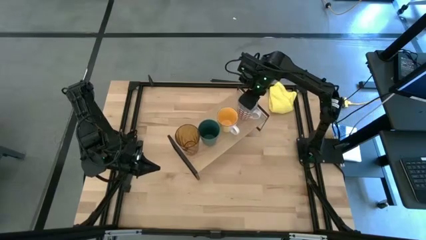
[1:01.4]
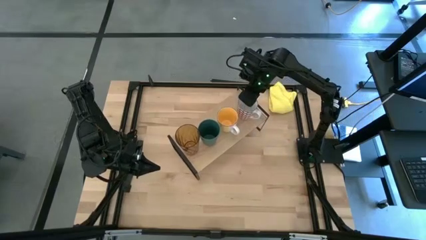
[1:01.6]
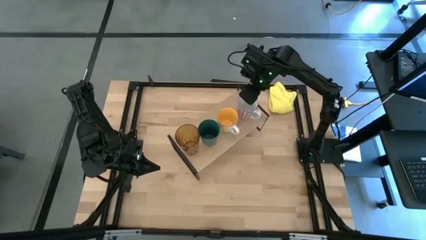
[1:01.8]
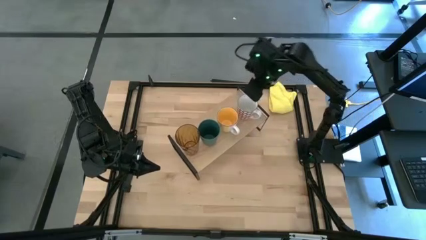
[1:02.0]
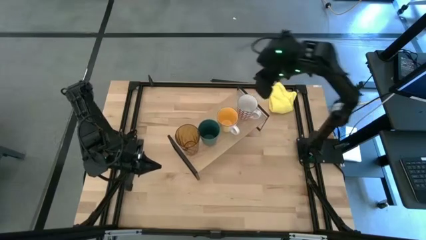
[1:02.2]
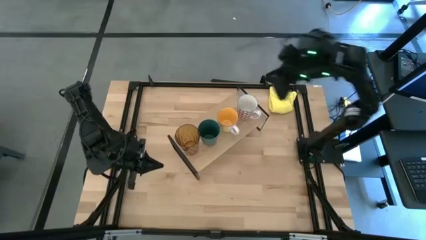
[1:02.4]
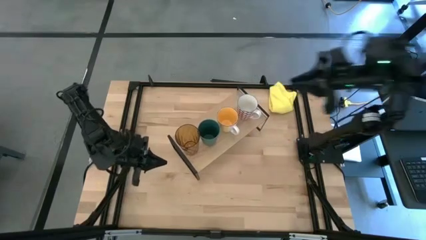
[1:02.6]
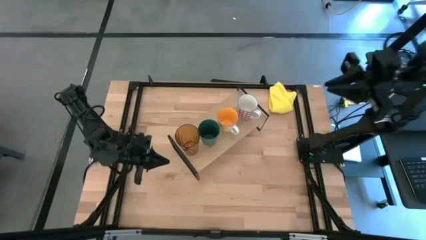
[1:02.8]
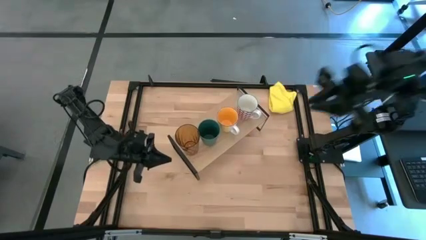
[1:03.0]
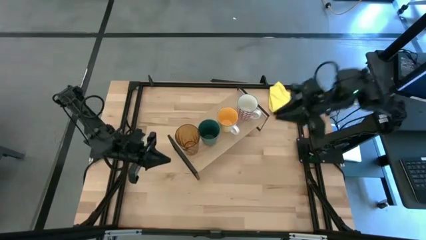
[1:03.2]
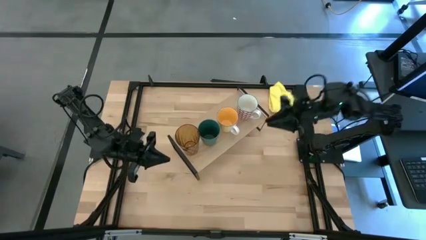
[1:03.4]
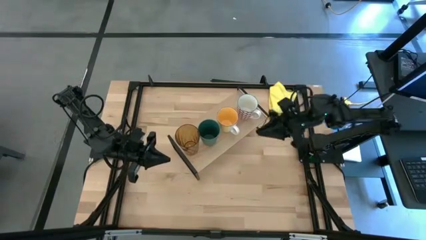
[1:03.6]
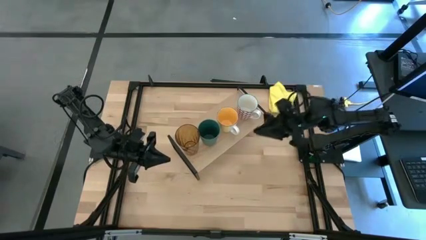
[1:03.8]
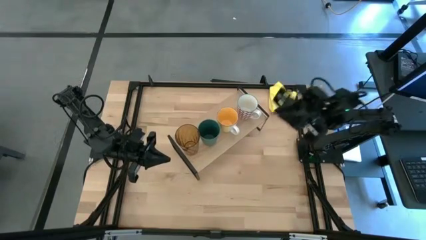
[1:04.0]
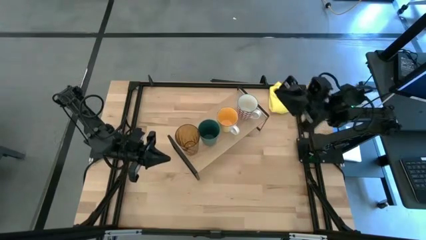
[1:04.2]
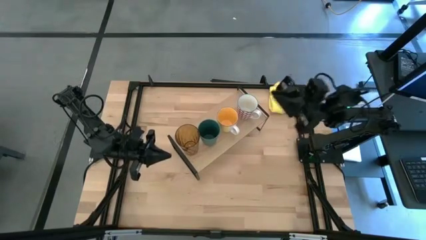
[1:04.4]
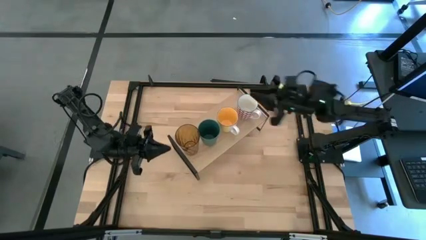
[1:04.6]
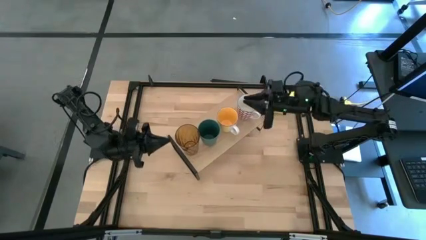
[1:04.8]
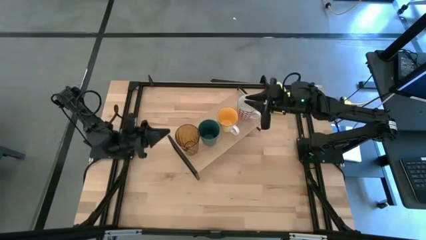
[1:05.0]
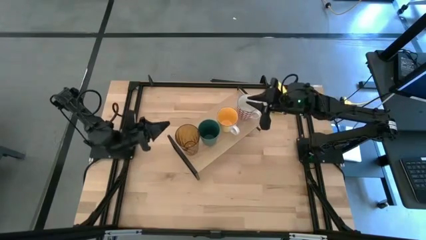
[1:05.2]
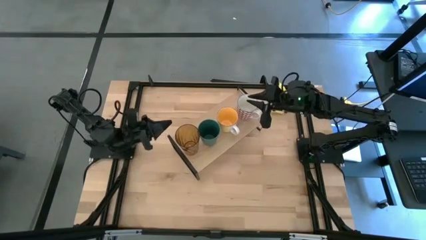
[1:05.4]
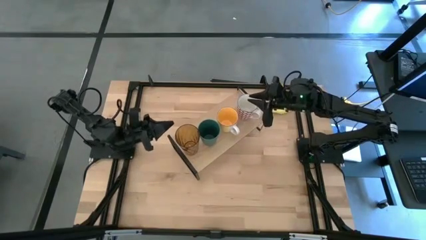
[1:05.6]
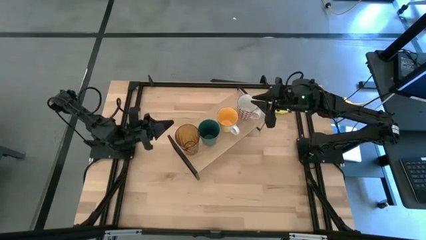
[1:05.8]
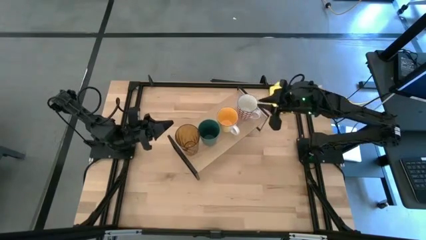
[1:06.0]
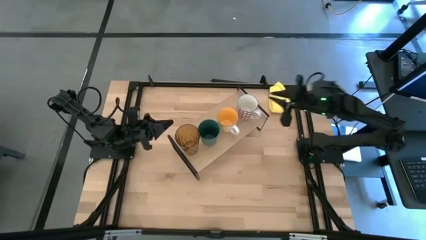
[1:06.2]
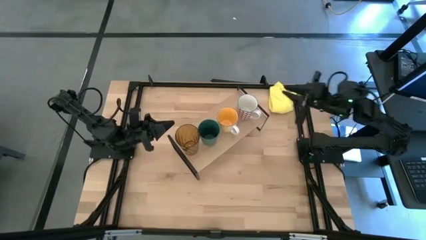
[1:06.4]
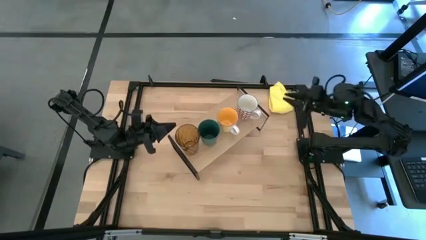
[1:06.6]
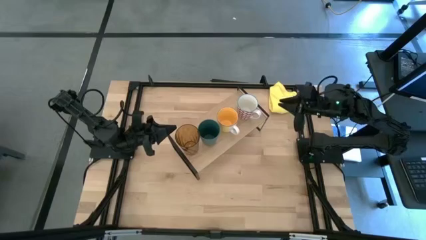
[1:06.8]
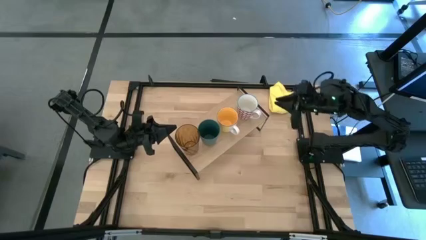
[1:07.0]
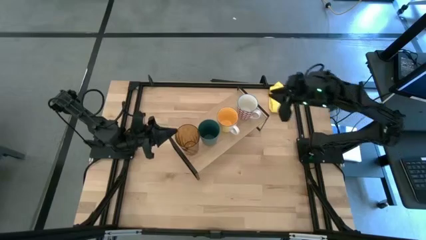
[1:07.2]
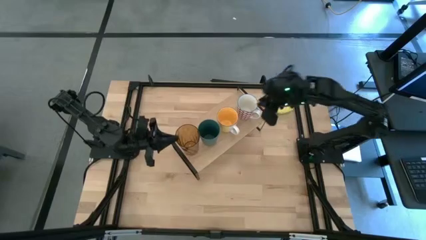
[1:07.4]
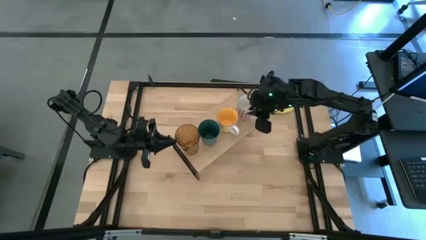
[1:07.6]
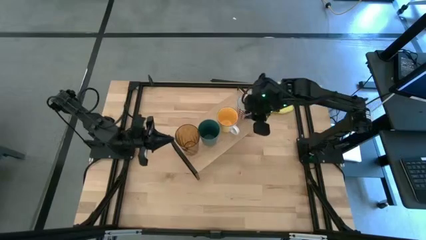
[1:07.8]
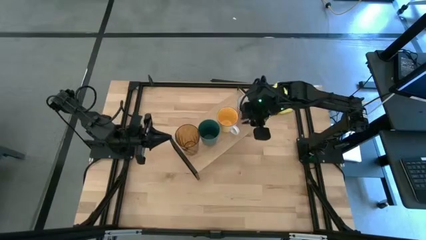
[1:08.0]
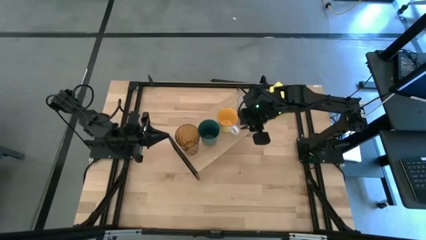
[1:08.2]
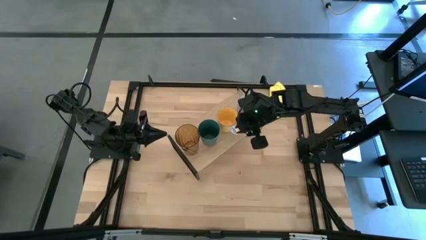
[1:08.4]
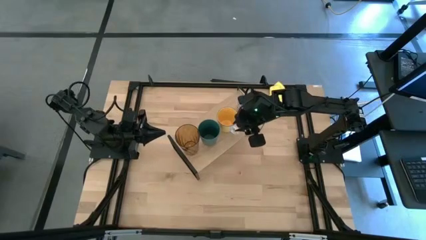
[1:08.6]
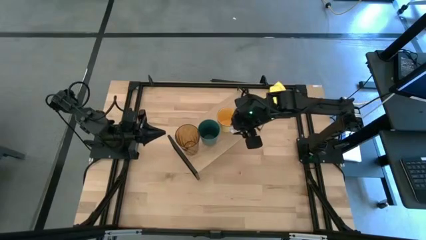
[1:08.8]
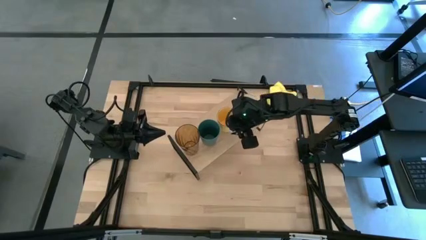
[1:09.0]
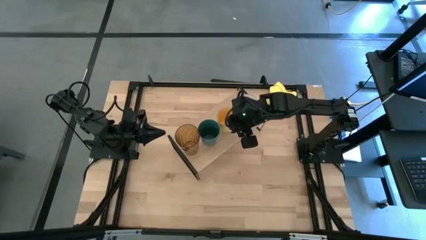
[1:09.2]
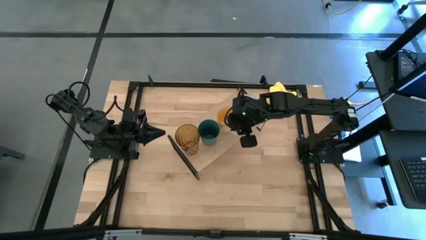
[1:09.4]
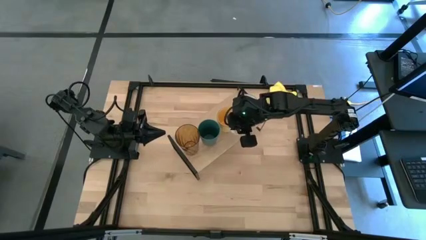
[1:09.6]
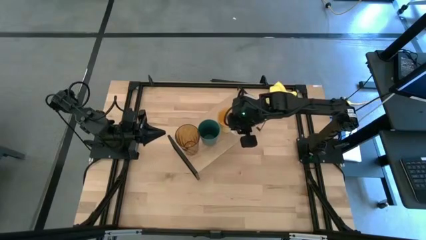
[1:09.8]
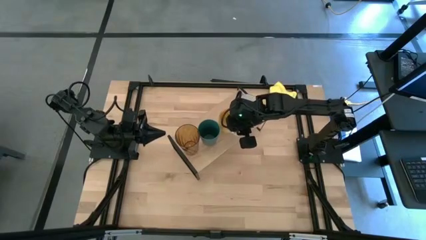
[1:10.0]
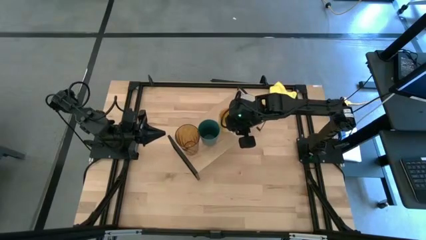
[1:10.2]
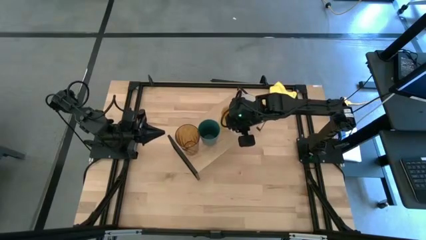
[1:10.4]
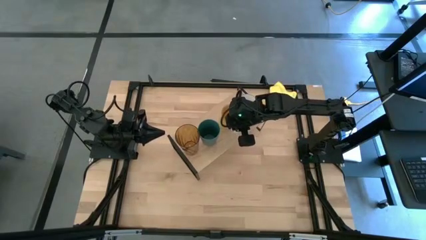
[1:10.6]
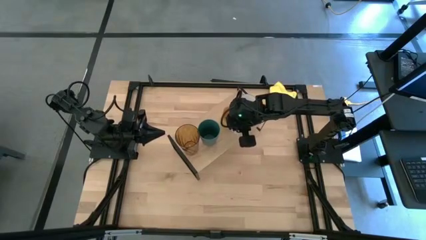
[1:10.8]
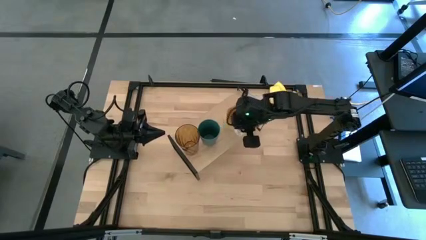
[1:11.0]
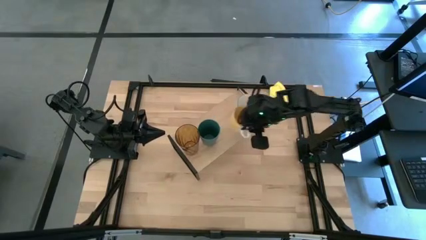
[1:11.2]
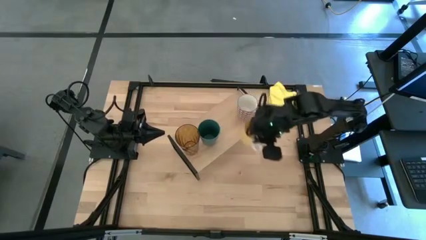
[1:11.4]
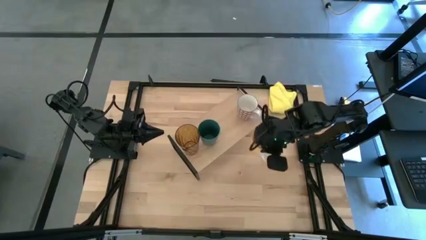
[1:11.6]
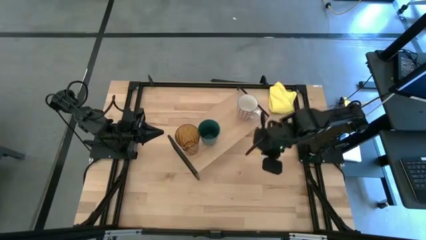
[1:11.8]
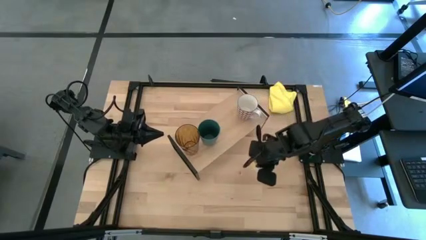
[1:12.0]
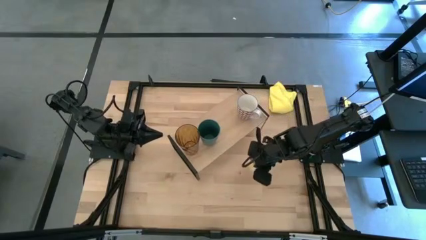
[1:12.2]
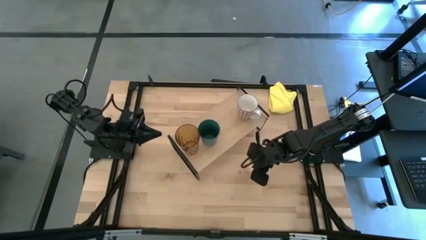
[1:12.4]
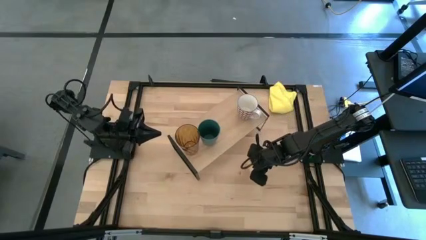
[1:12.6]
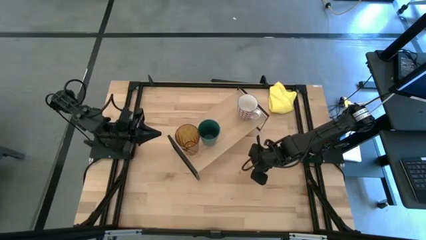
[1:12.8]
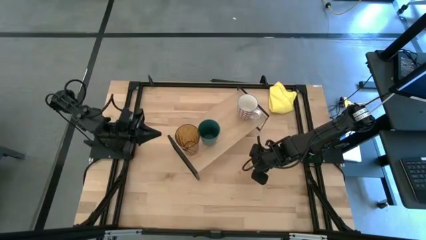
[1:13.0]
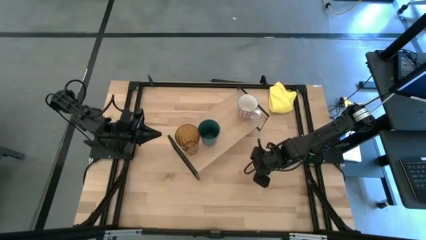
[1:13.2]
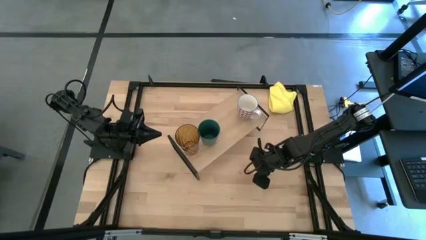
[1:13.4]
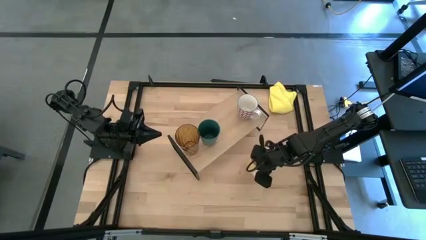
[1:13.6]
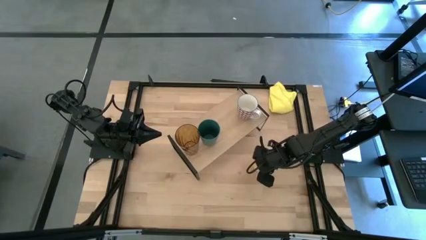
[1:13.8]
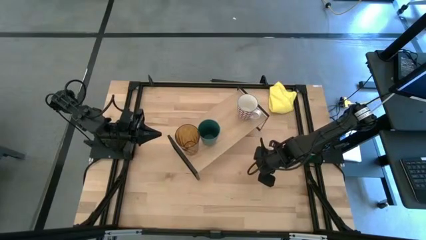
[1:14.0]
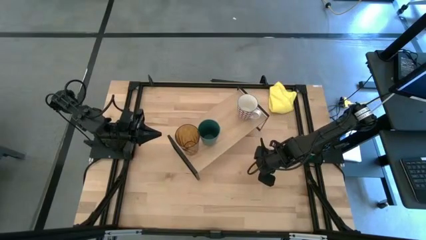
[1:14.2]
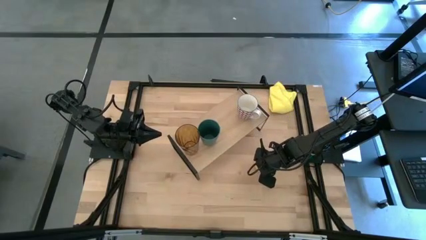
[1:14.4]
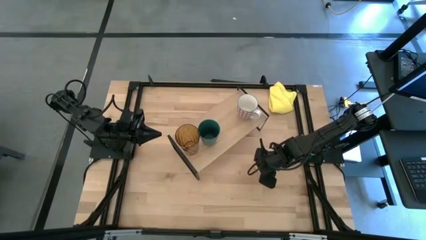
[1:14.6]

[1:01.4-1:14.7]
Task: Stack small to large cups/mugs on shelf
Remove the yellow mug from the shelf

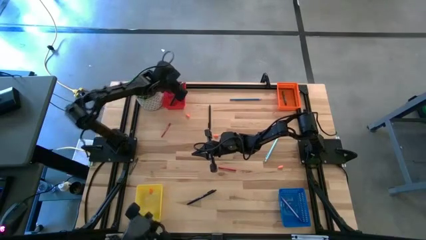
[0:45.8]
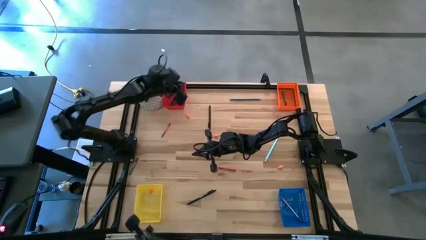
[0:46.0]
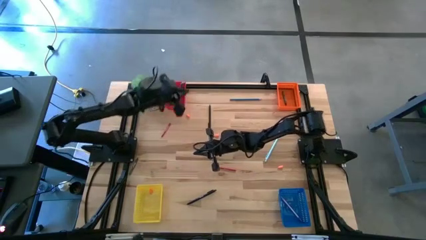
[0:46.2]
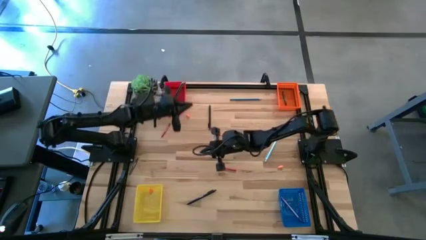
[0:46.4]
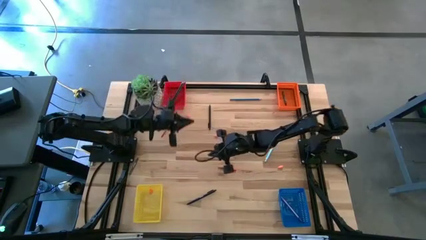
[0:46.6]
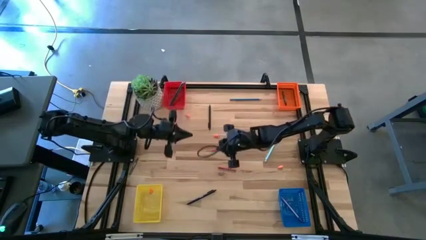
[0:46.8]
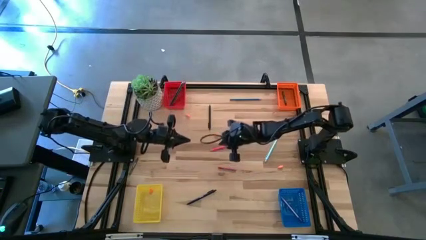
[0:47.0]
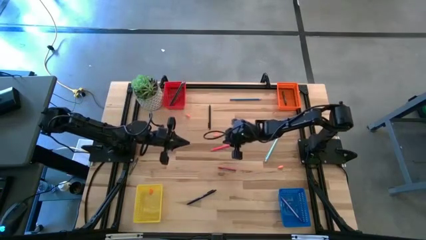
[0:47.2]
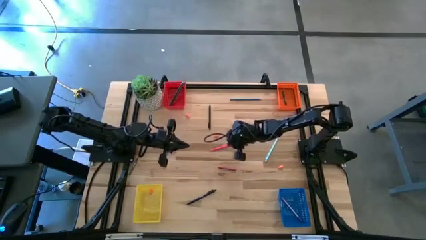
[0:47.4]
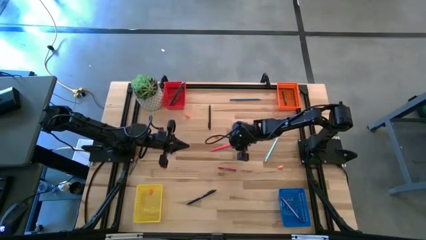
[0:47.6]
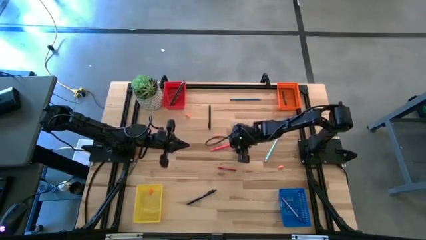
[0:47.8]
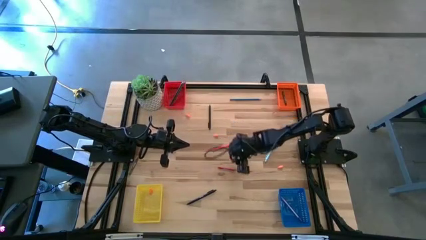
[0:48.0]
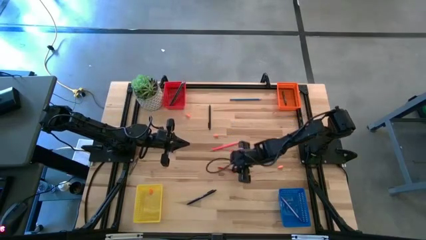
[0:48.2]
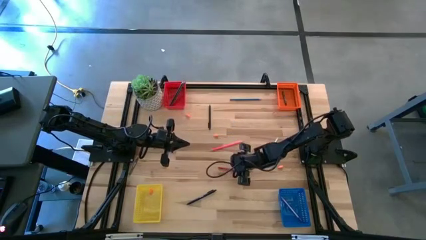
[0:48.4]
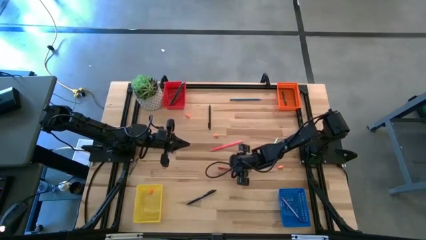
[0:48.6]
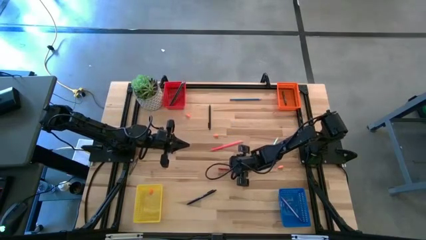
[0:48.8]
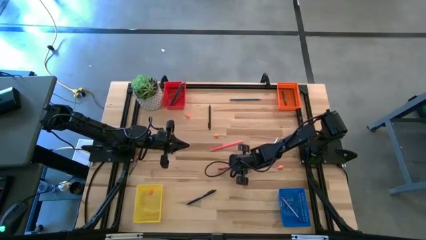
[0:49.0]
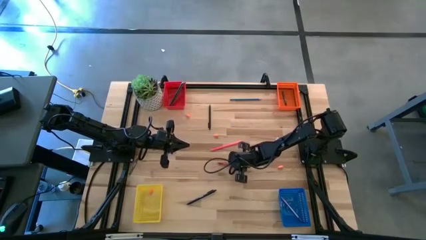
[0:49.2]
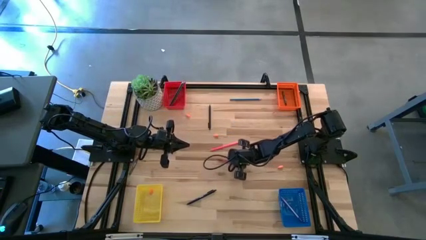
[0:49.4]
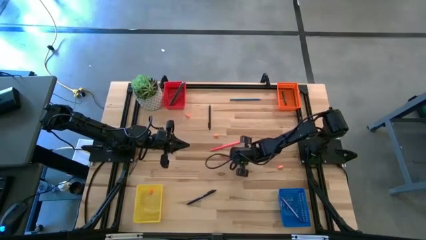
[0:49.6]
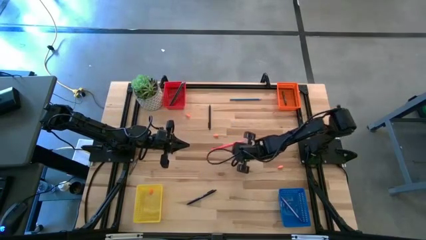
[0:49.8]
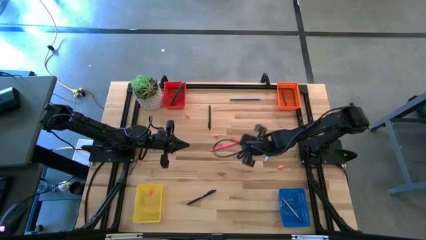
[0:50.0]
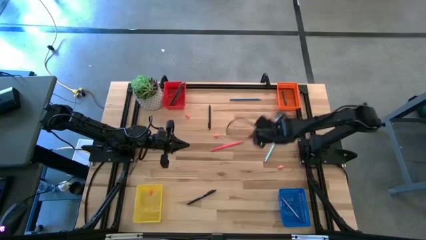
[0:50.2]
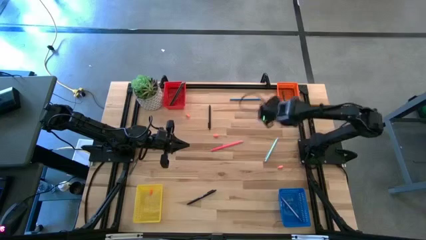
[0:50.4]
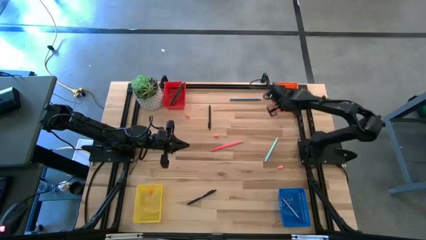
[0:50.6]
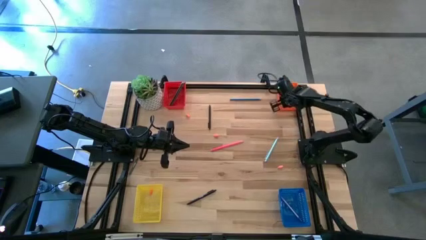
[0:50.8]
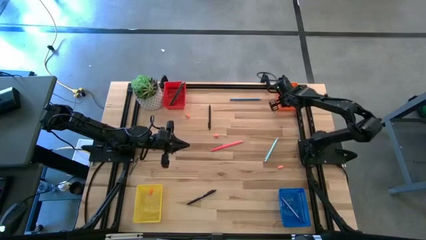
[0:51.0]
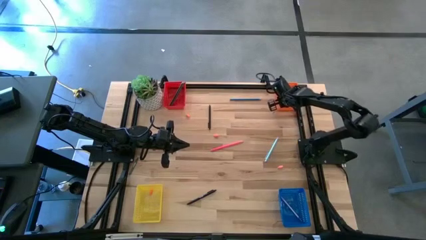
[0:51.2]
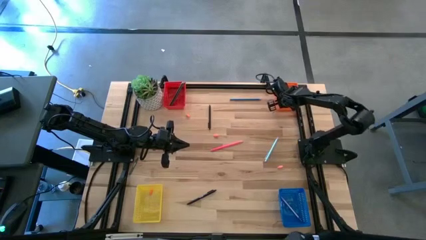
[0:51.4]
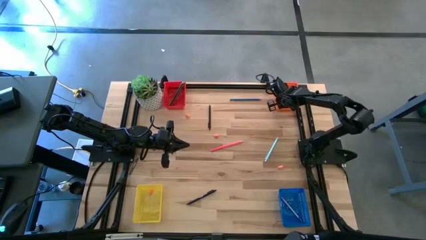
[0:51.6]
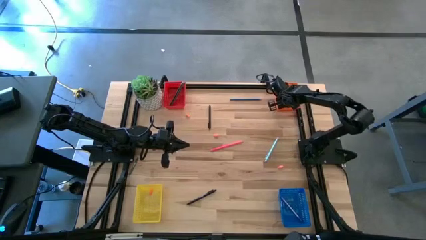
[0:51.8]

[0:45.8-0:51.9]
Task: Sort crayons/erasers/pens/pencils in bins
Put the red crayon into the orange bin
